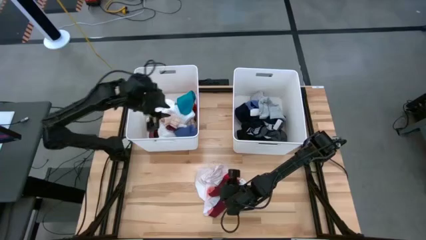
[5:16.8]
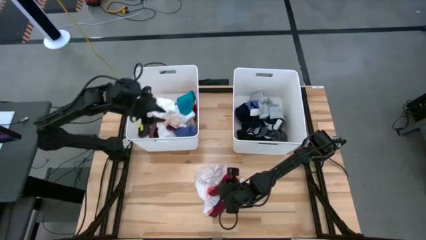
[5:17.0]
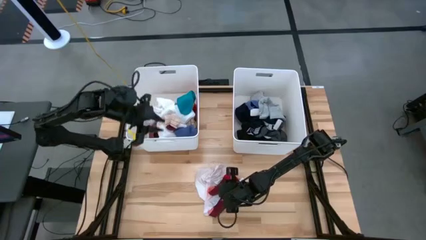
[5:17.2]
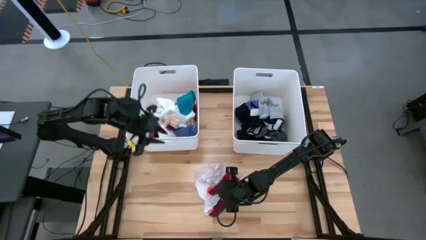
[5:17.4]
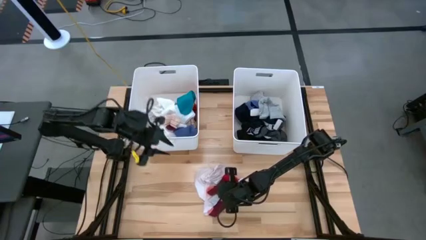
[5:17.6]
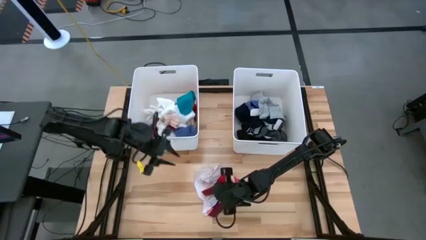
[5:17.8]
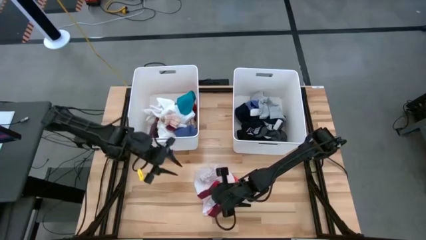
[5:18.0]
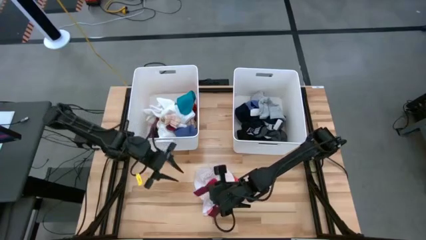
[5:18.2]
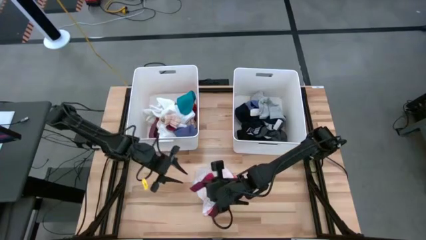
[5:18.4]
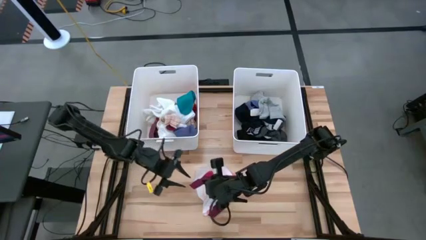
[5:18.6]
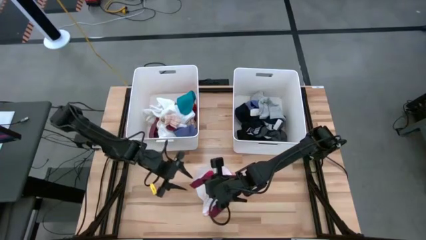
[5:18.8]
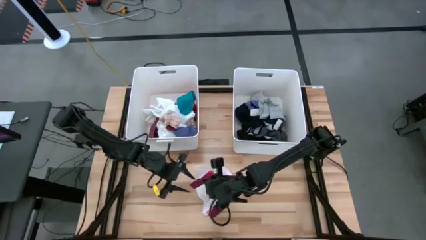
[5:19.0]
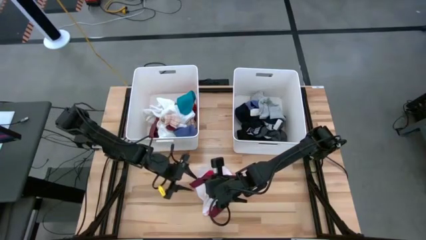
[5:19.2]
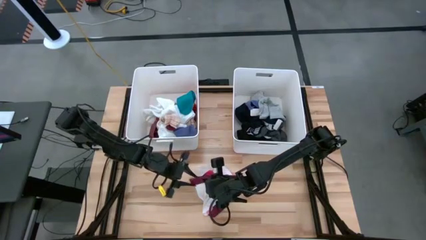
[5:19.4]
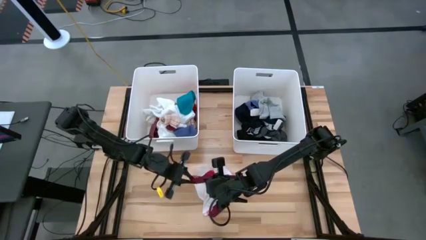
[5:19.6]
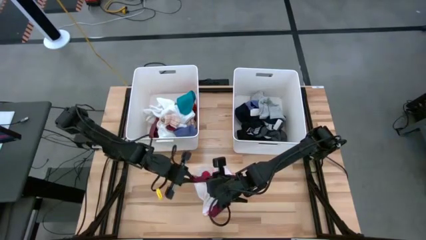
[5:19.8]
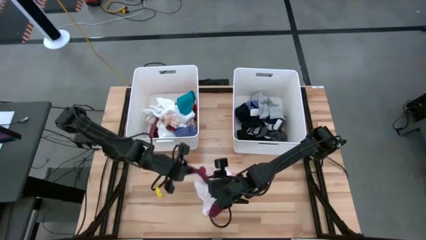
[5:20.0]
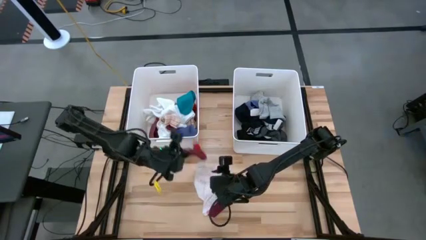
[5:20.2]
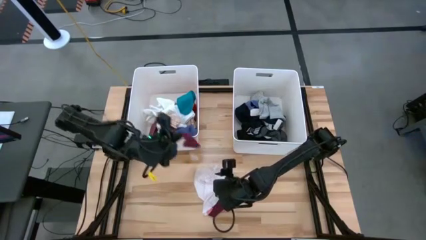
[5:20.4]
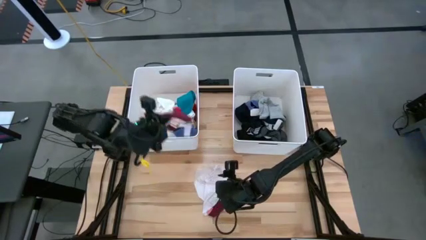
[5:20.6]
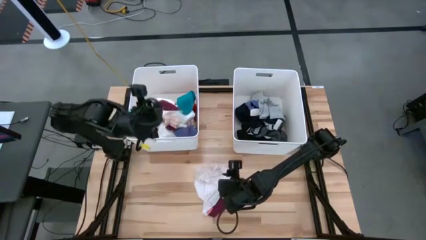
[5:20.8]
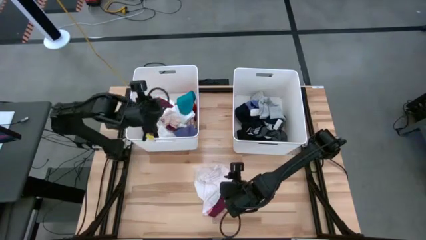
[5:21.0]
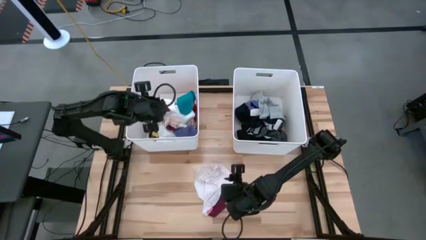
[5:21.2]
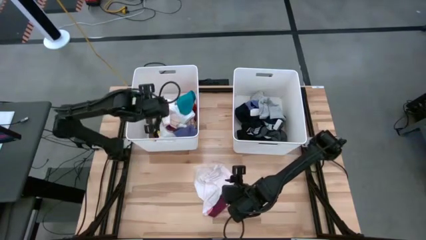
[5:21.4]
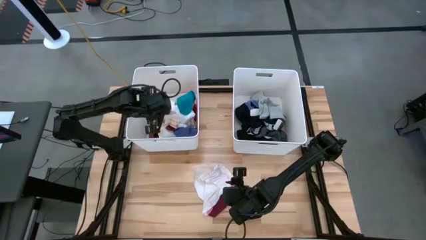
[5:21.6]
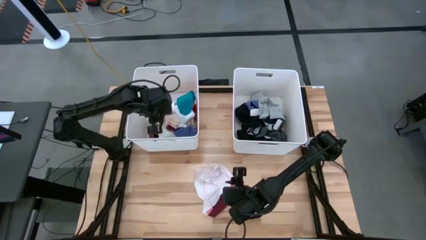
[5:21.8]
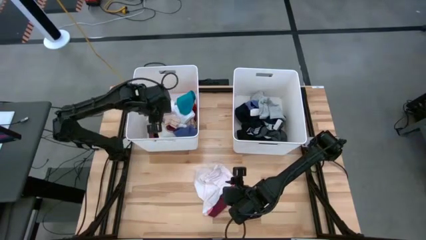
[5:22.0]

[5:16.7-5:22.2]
Task: Sort clothes
Put the red sock into the left white bin

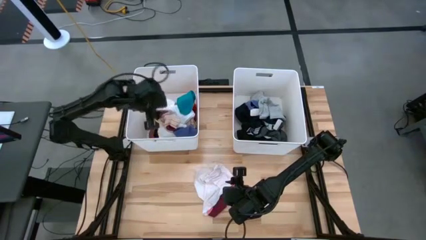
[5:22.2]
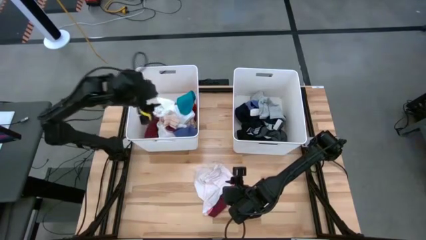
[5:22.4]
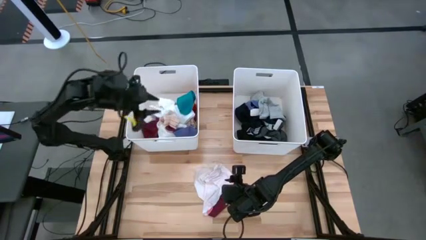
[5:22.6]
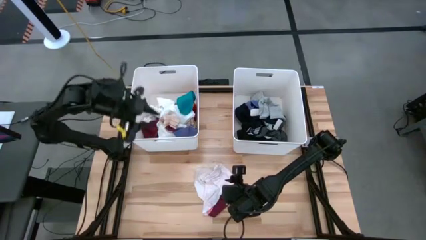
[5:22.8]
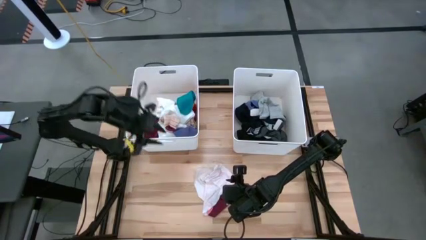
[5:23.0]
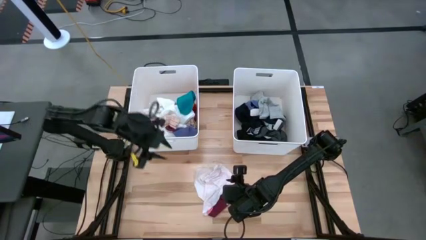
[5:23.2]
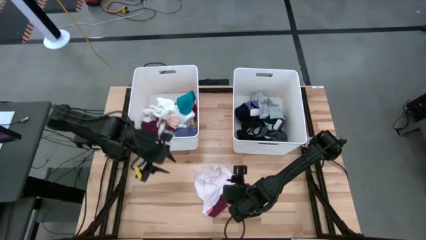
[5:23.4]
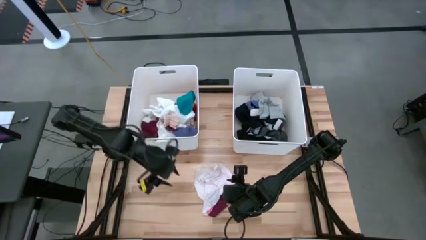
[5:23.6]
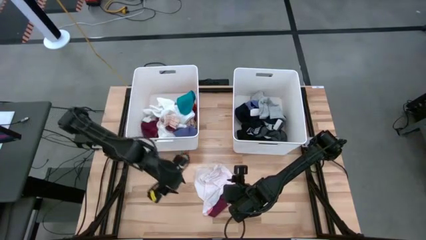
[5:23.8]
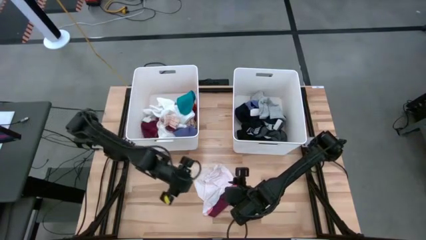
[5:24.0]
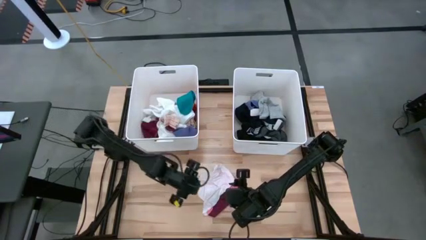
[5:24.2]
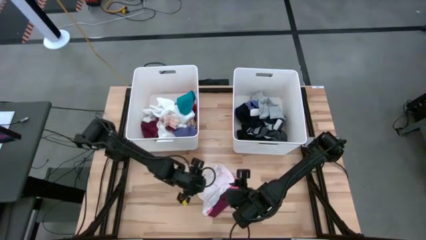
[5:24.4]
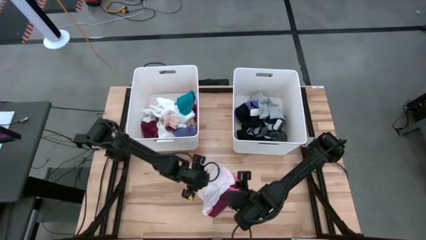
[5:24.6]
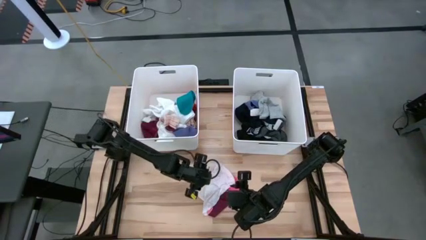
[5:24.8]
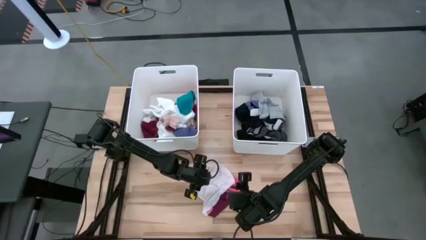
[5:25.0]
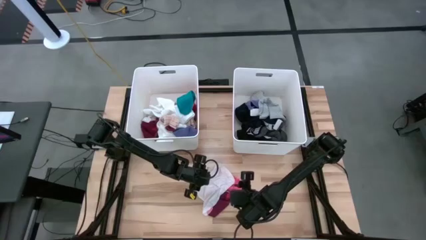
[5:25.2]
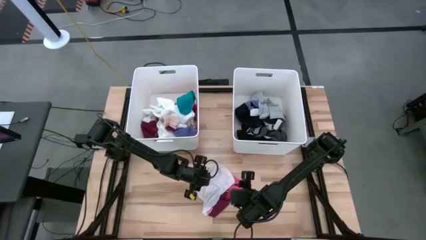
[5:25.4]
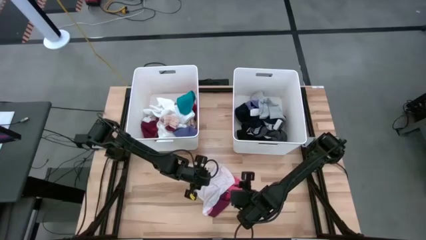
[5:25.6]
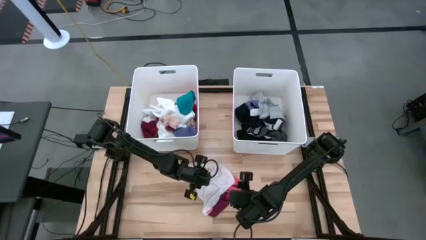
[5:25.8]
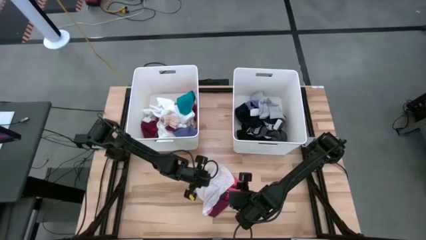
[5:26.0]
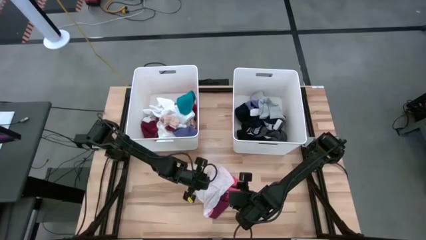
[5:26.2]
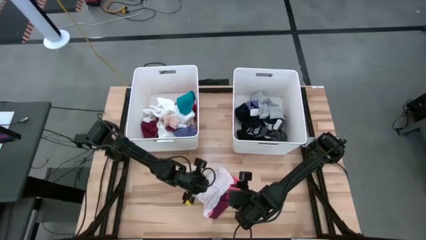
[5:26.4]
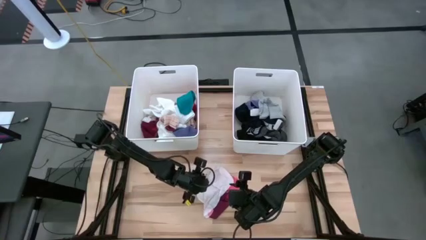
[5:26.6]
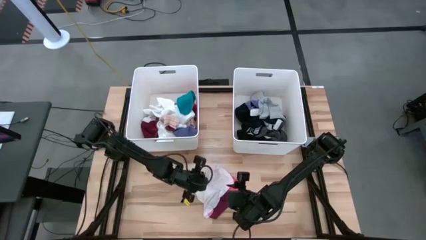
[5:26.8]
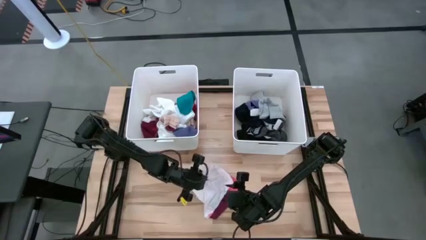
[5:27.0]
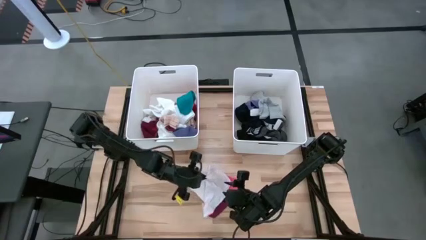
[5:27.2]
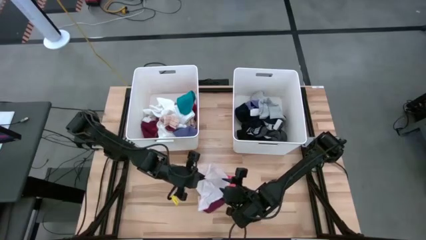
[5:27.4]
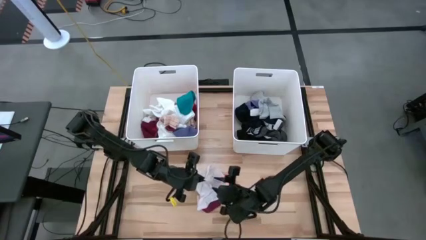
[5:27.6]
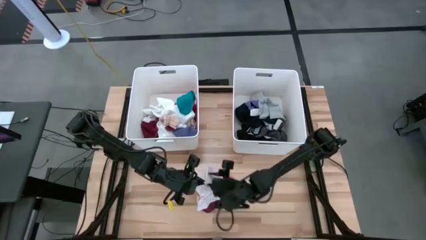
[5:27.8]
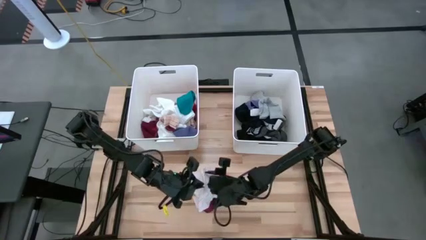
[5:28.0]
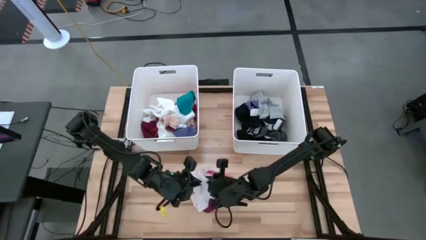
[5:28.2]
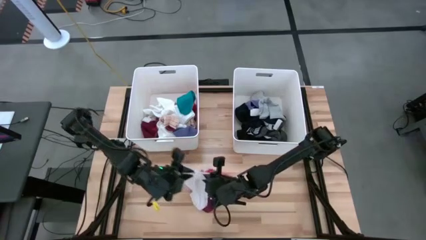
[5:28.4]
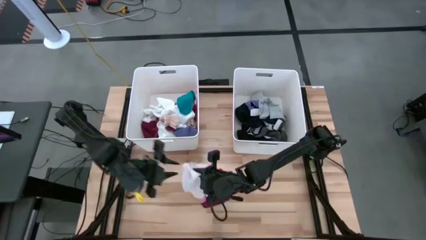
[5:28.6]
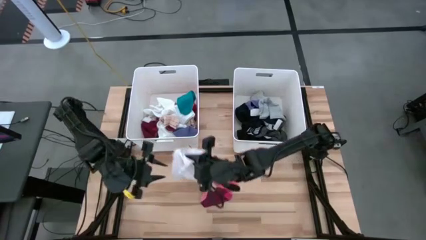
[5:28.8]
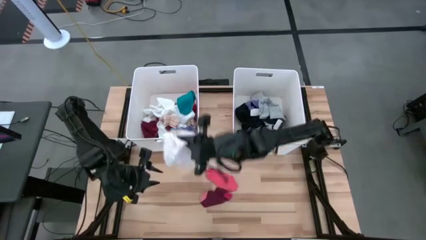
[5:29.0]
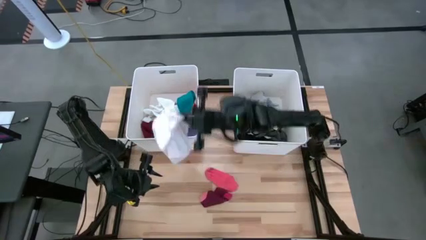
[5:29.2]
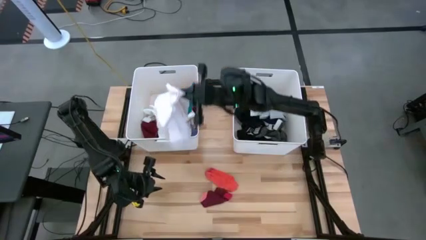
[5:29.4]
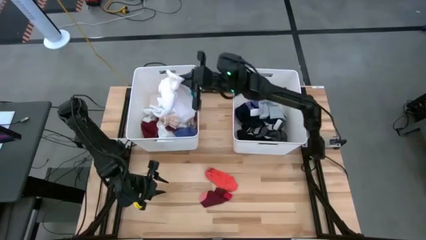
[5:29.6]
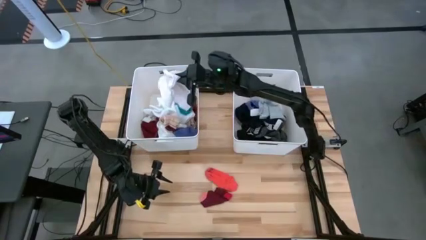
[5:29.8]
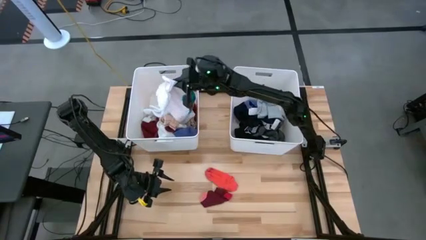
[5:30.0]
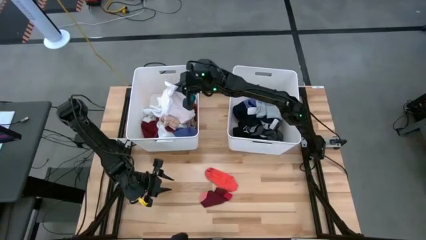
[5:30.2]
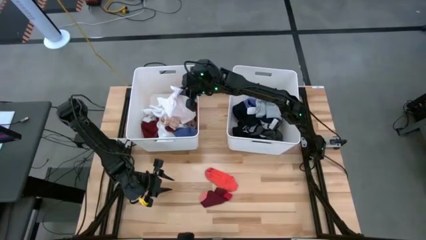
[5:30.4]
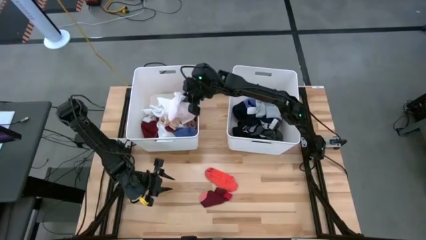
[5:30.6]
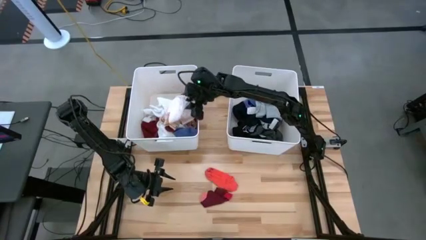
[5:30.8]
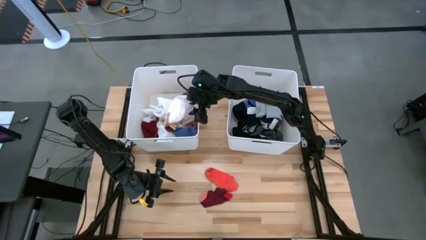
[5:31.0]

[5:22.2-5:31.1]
Put the white underwear into the left white bin
